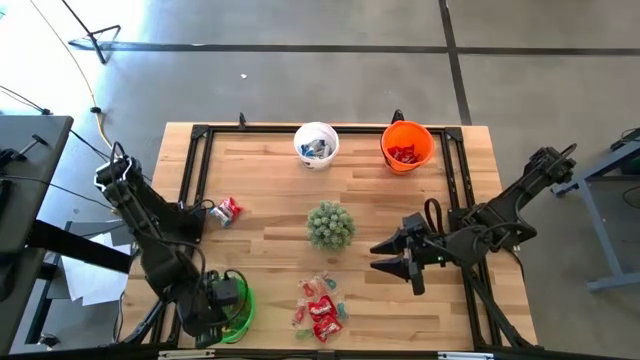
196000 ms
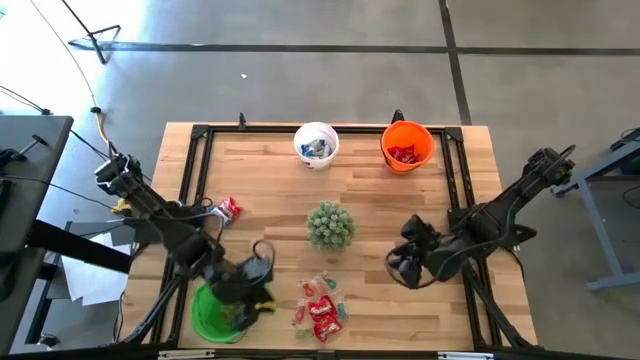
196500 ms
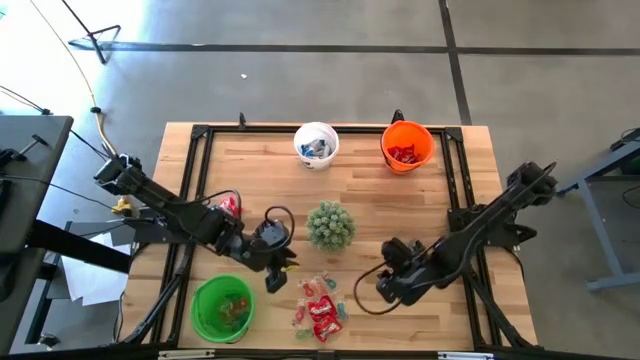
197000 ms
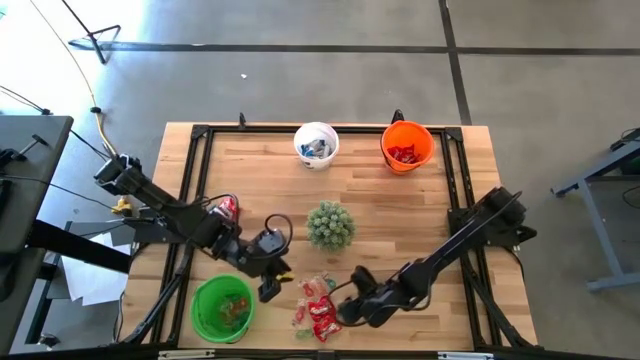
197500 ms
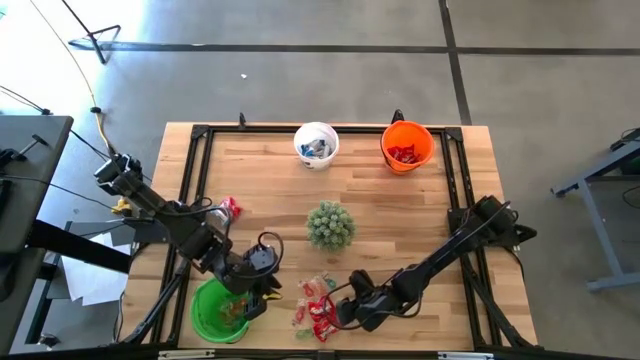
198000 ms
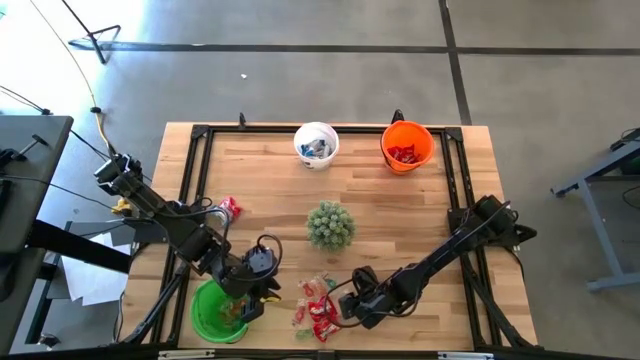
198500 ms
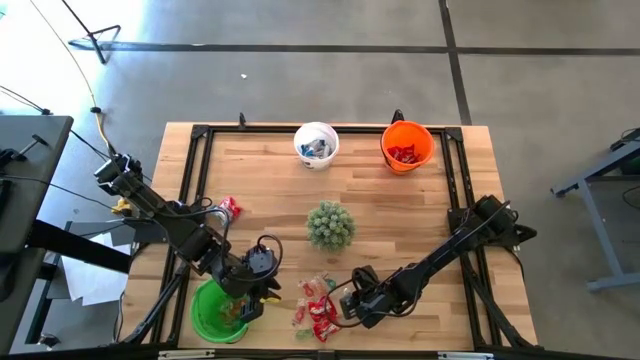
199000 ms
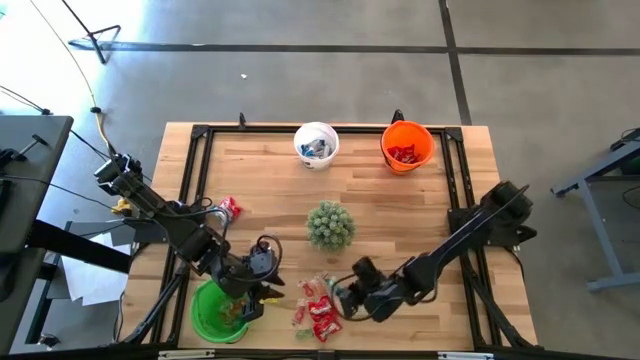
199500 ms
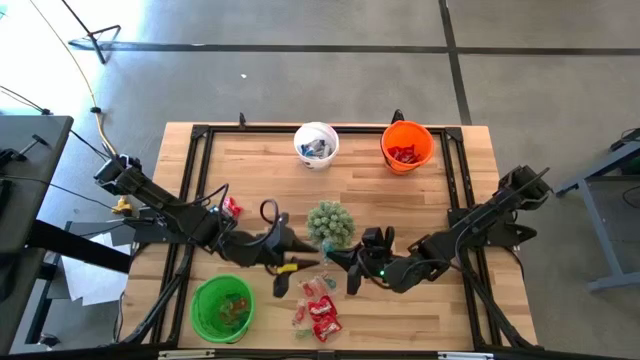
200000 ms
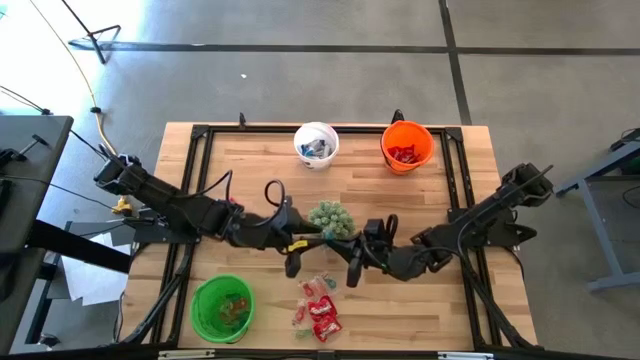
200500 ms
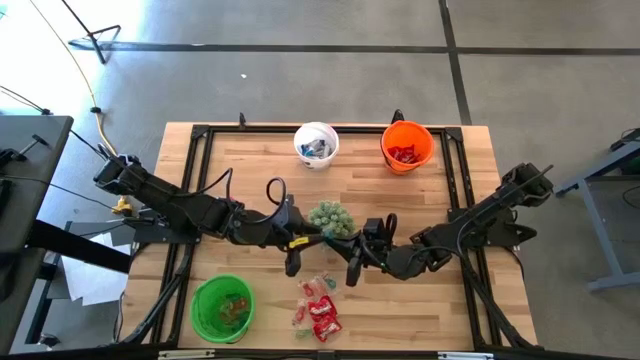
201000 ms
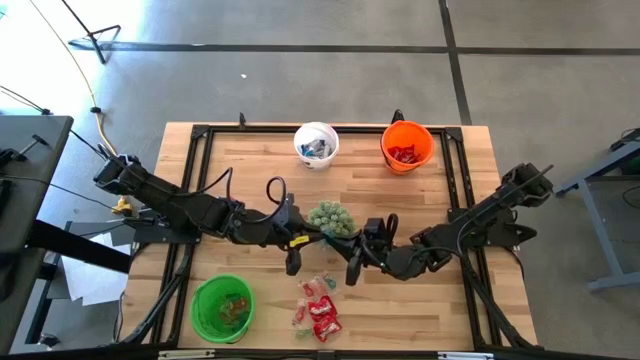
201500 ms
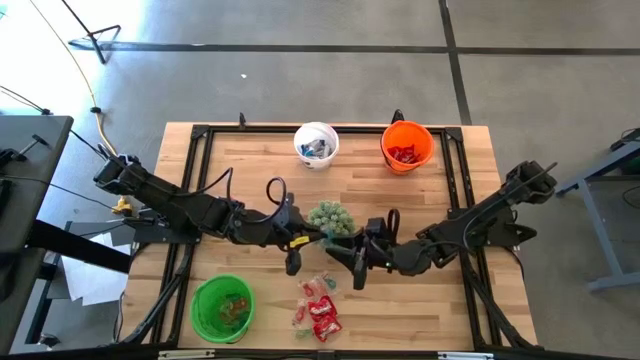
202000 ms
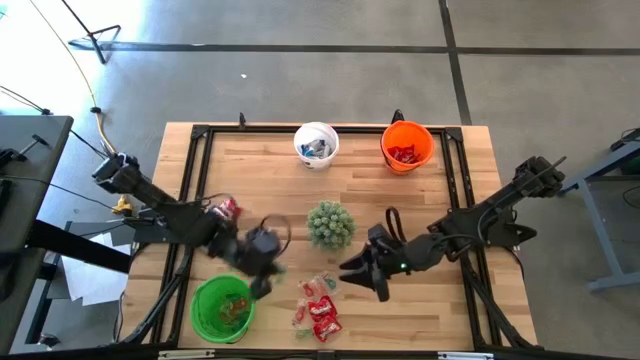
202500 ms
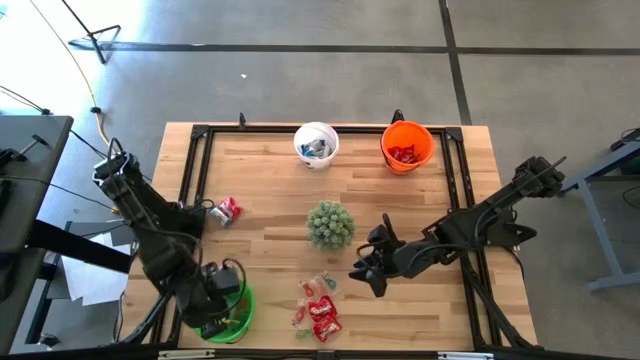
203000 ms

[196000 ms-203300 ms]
Task: Sort candy
Put the blue gummy into the green bucket

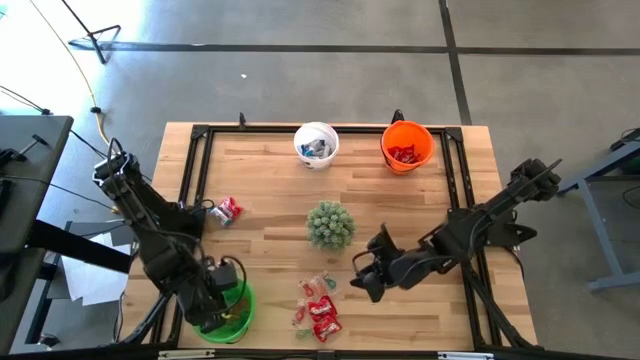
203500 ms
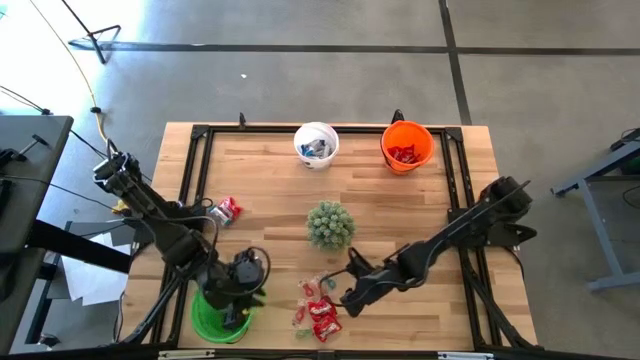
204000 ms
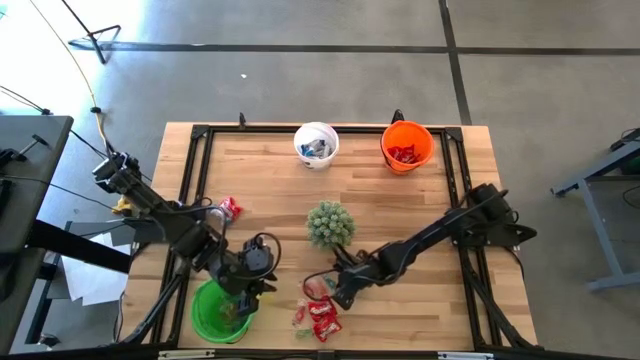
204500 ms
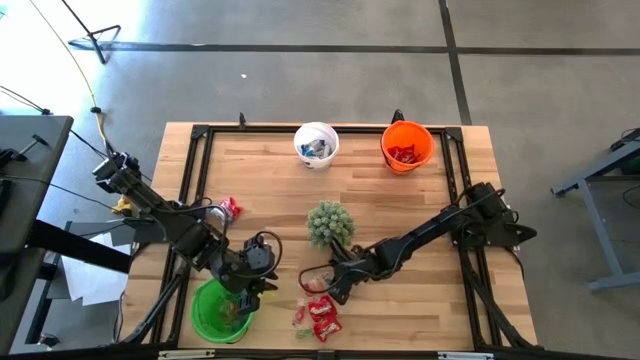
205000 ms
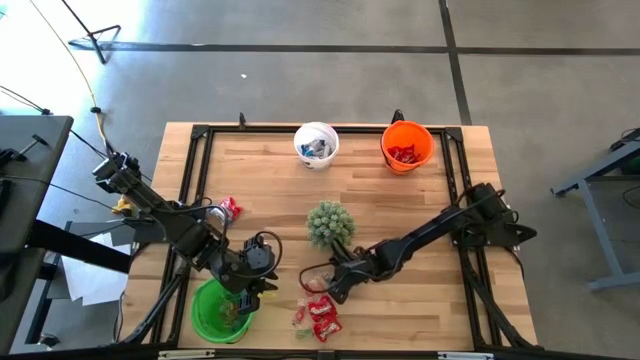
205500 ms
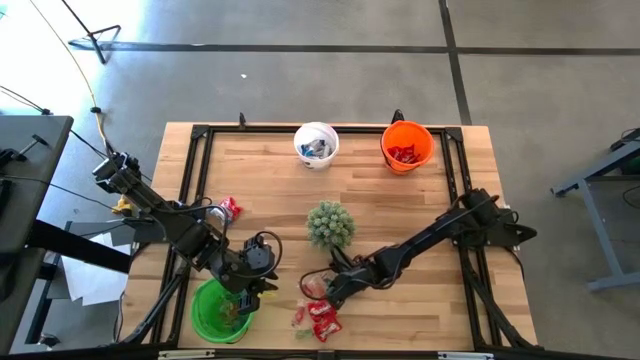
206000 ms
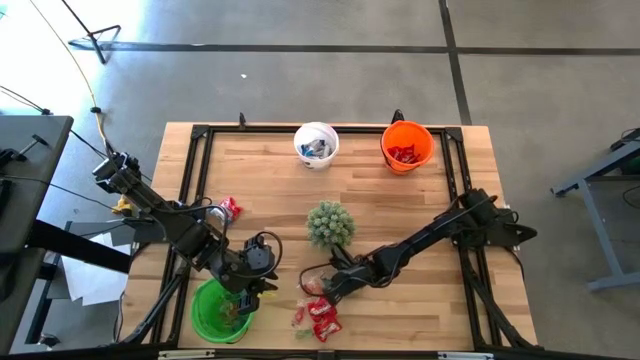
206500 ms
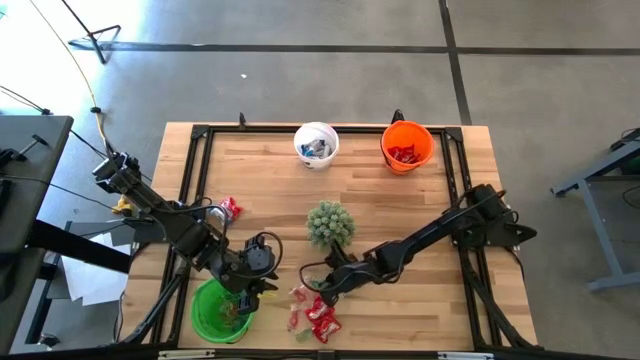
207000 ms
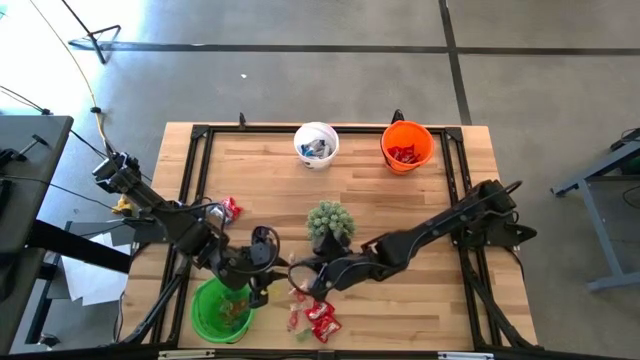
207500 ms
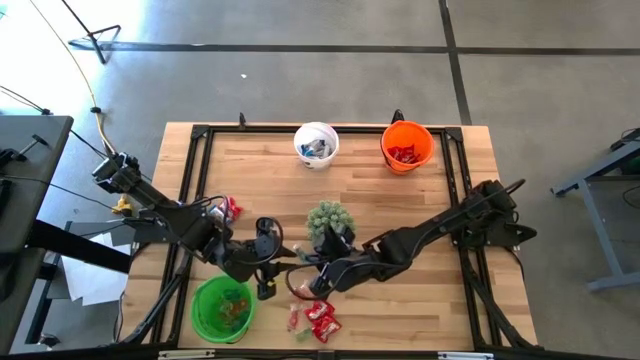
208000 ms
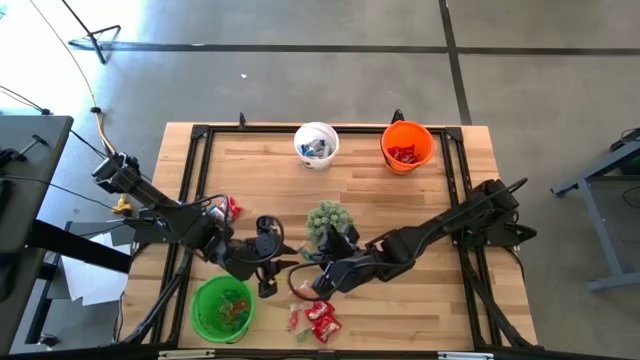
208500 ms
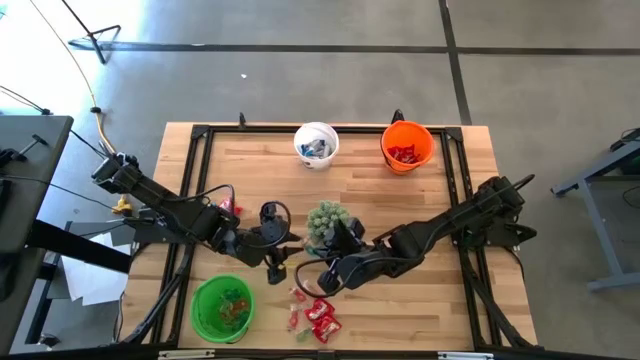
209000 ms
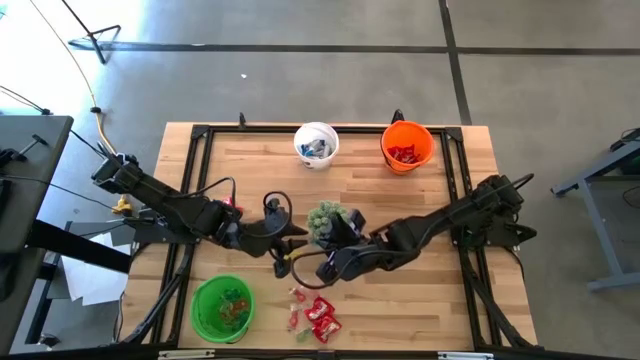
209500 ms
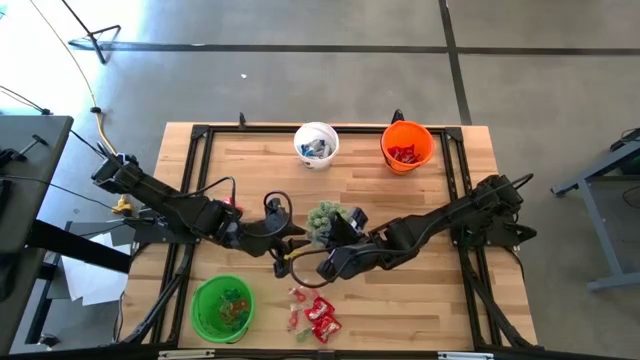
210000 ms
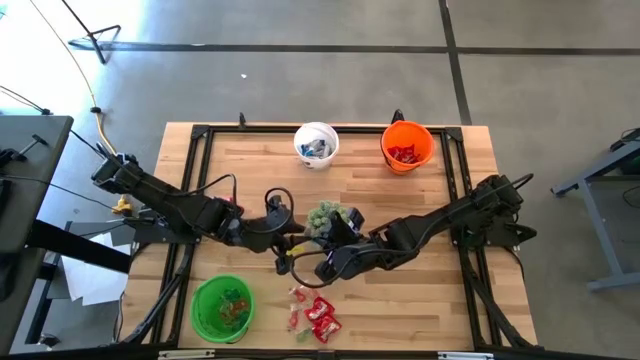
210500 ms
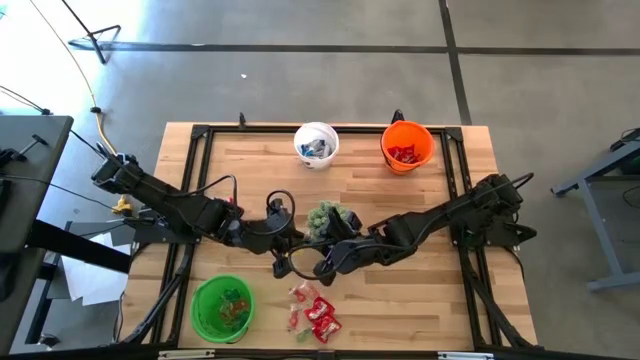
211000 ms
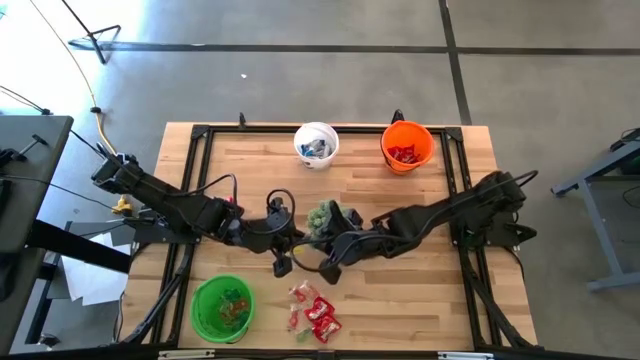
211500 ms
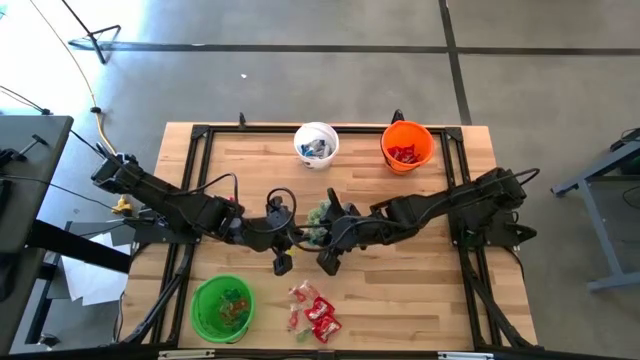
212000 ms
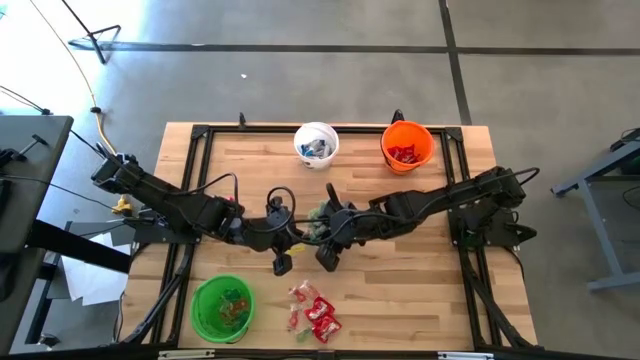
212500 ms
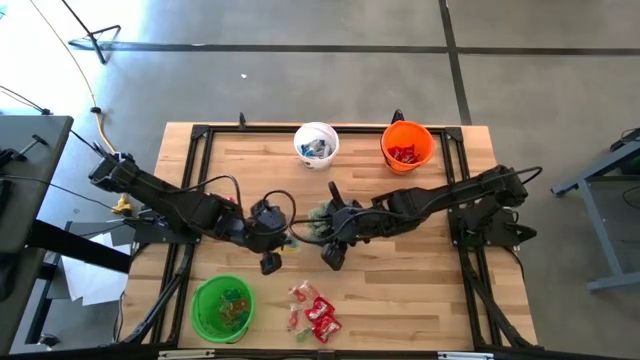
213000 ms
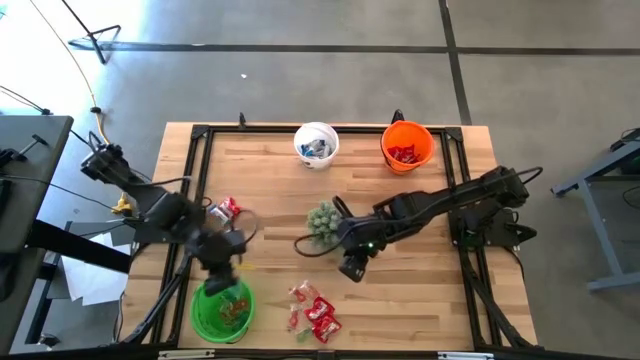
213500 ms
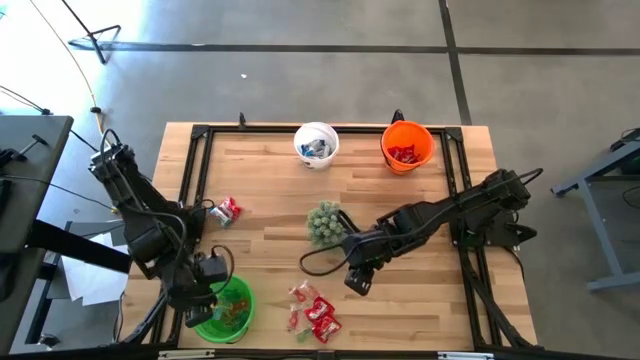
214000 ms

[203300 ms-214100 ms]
Put the blue gummy into the green bucket

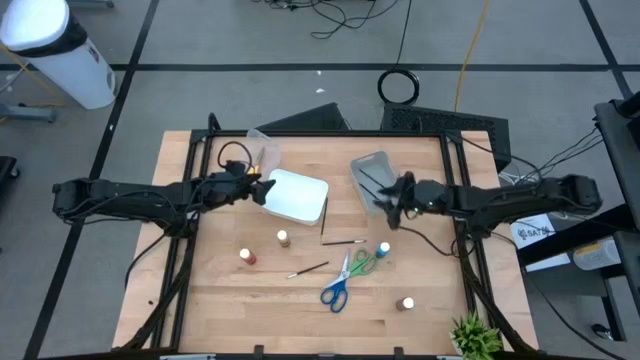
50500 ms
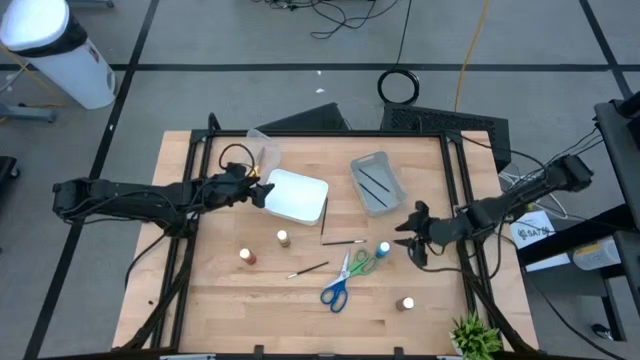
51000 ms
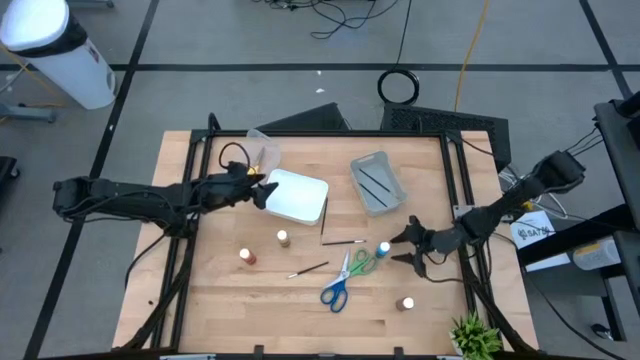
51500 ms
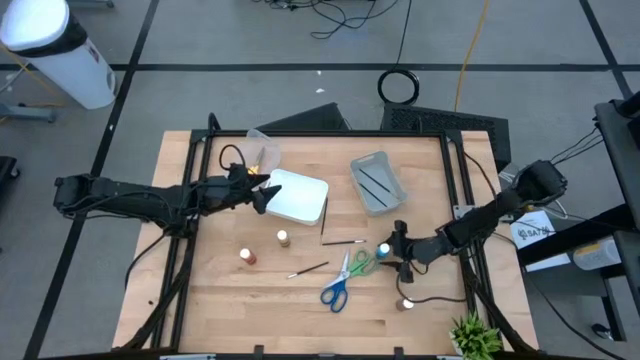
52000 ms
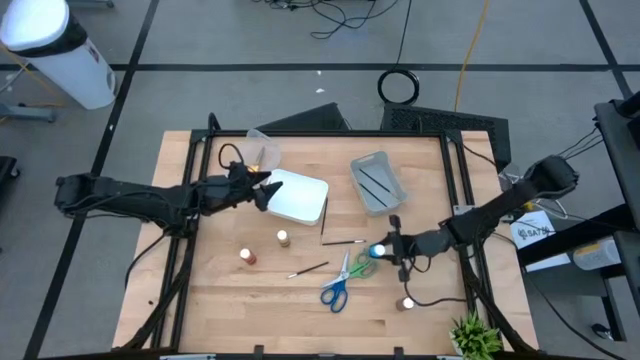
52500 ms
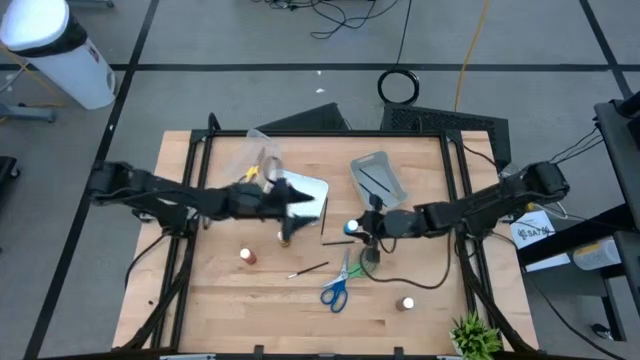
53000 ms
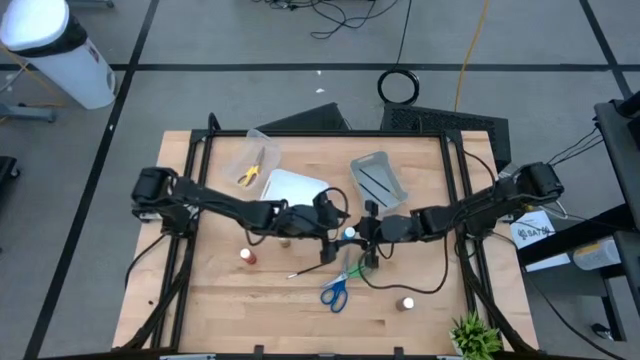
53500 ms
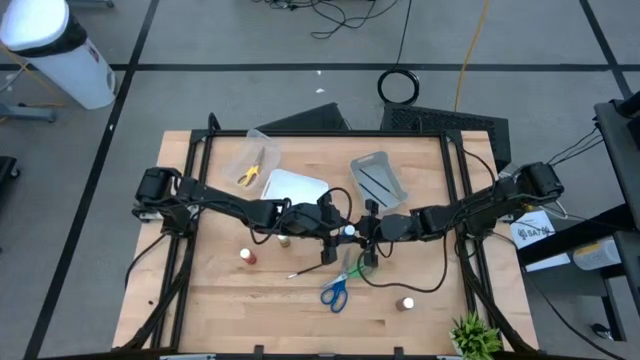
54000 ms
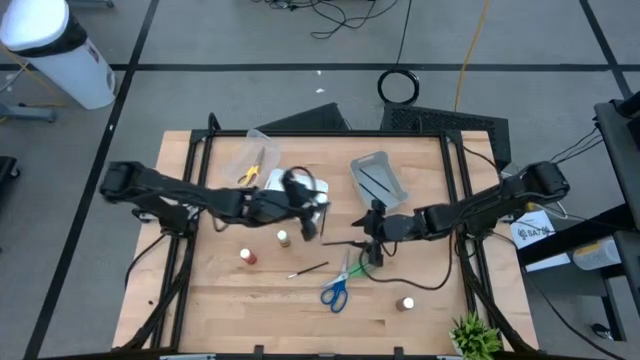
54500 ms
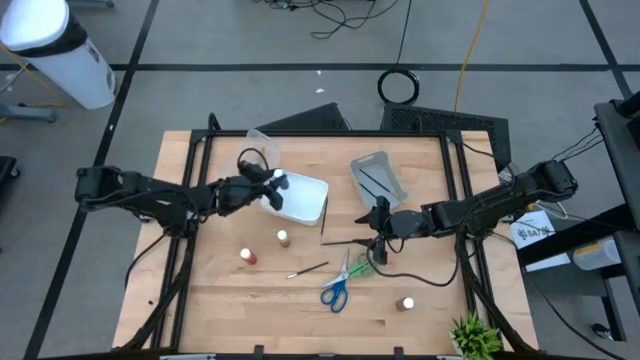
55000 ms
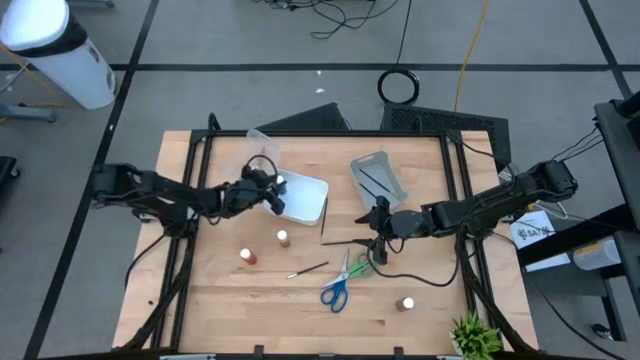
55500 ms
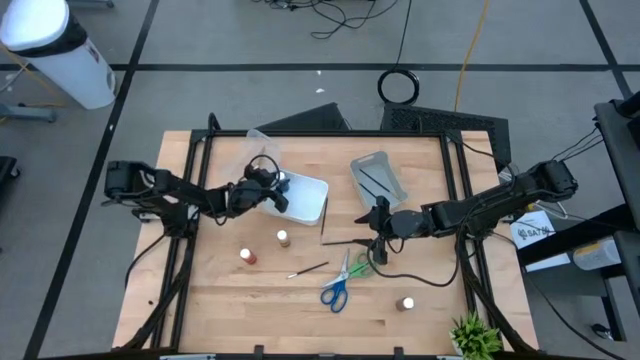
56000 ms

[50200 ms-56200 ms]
Task: Pick & Place Paint Supplies
Put the blue paint bottle into the white bin
